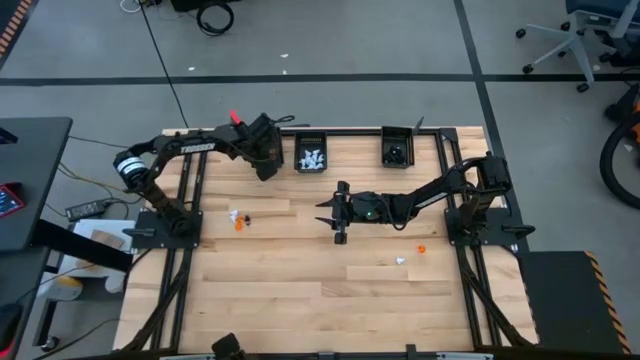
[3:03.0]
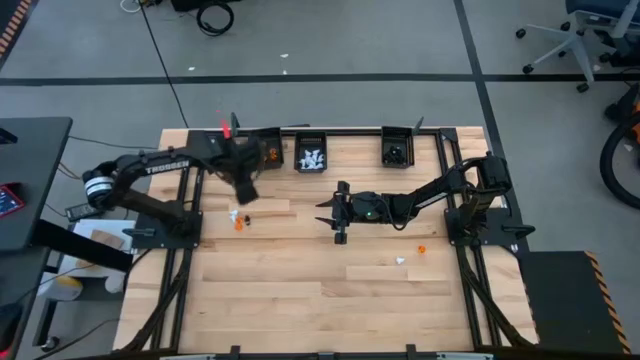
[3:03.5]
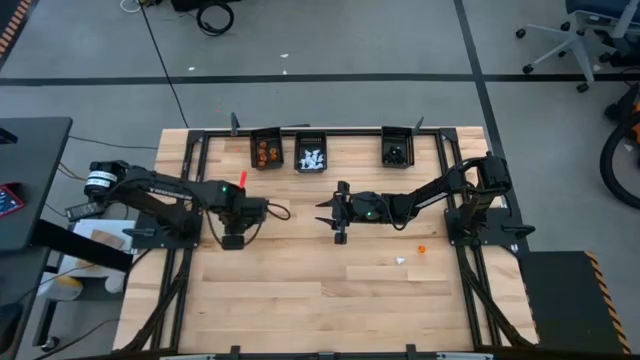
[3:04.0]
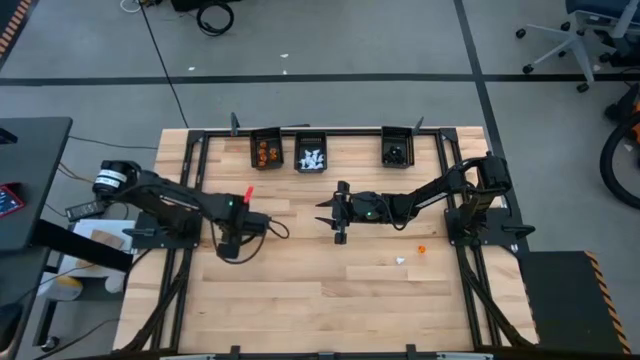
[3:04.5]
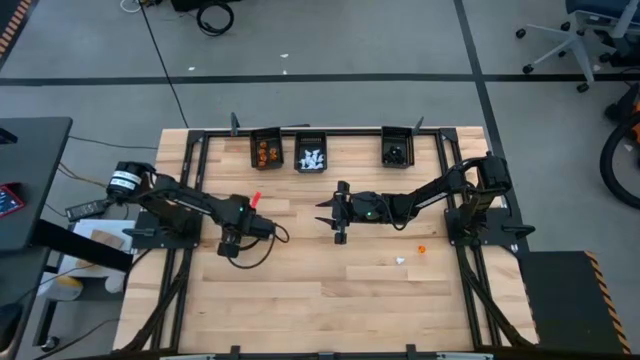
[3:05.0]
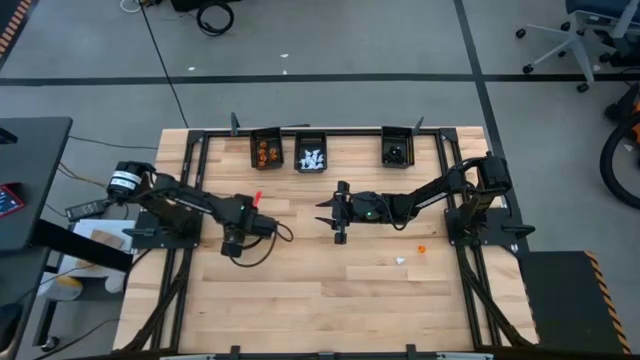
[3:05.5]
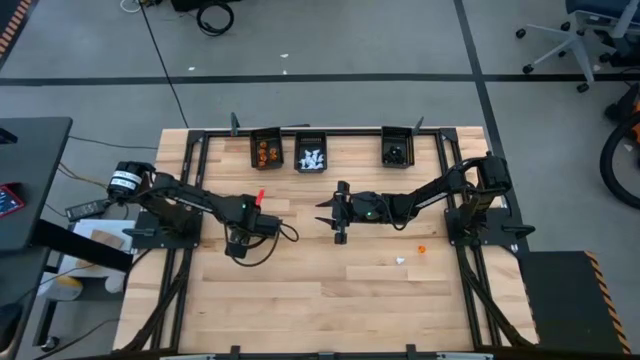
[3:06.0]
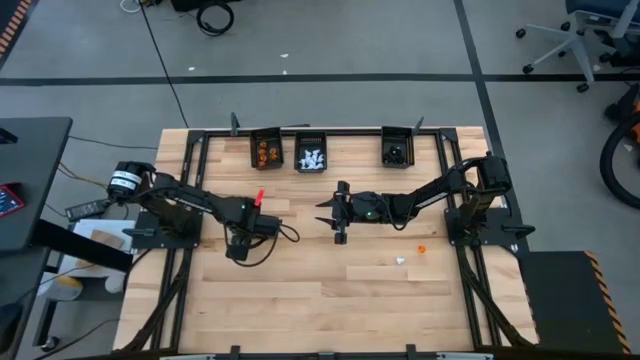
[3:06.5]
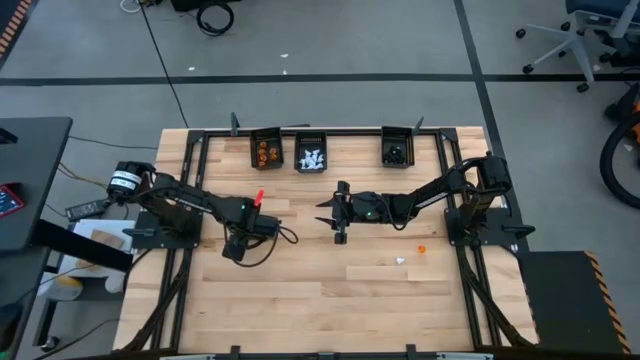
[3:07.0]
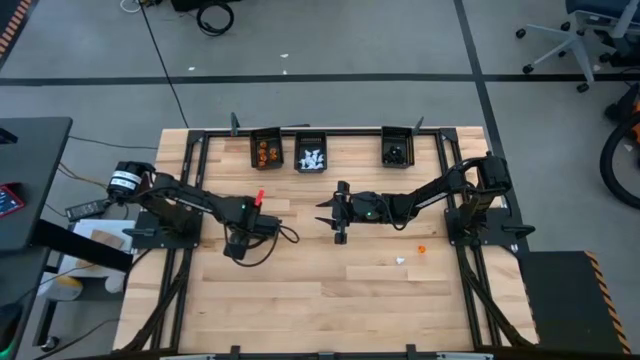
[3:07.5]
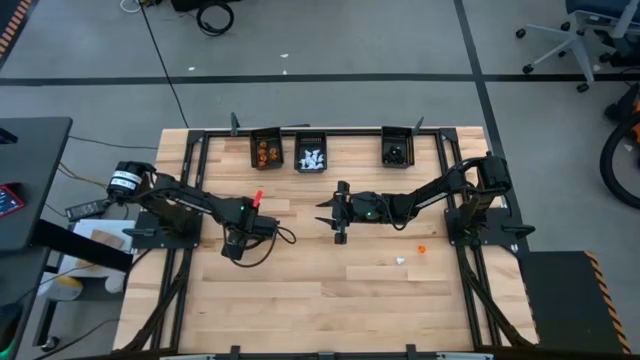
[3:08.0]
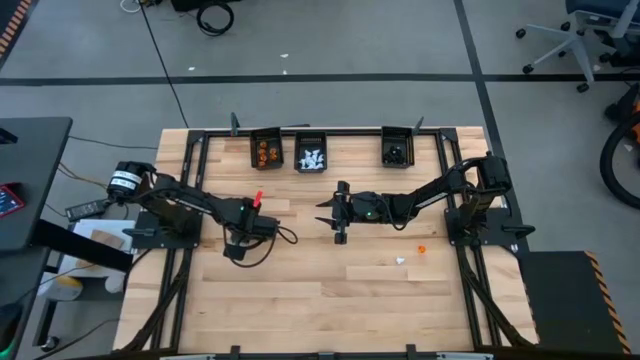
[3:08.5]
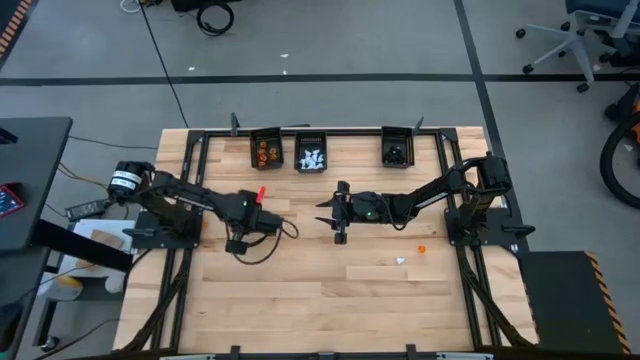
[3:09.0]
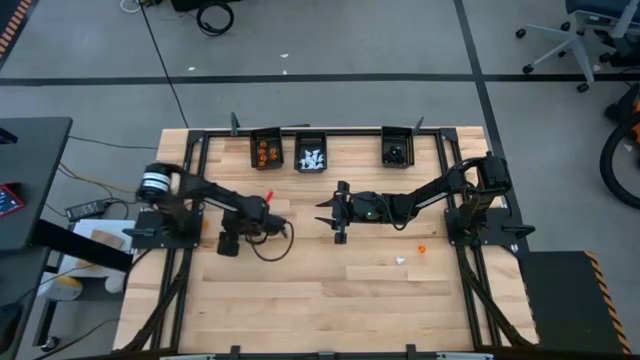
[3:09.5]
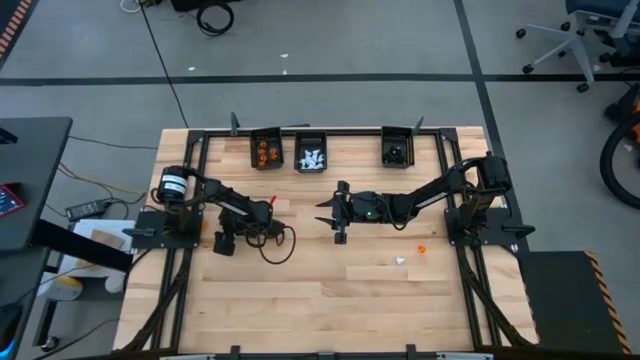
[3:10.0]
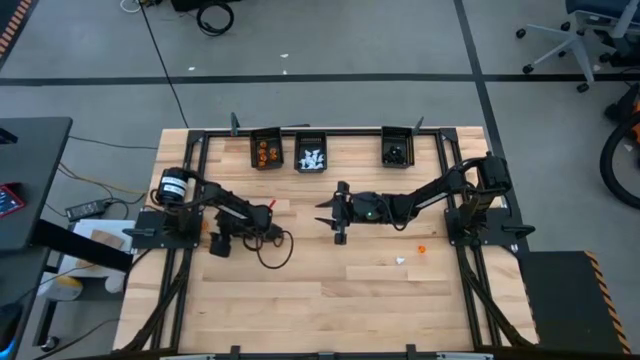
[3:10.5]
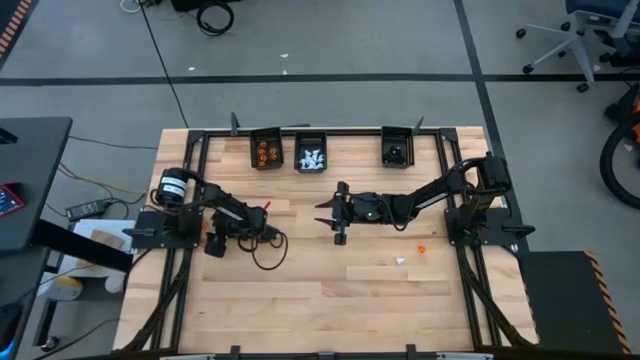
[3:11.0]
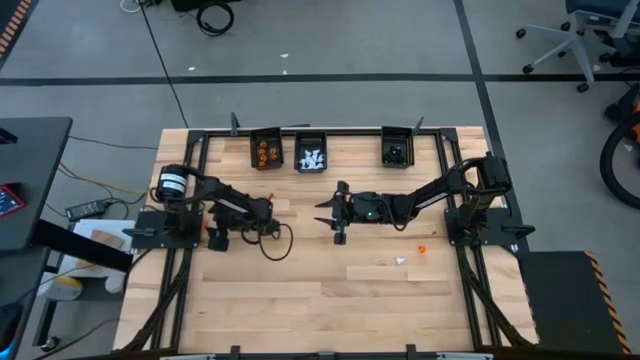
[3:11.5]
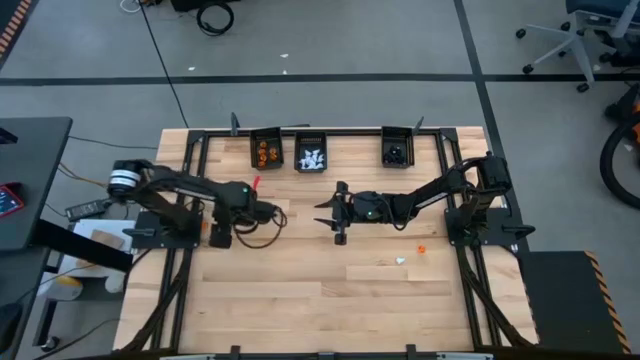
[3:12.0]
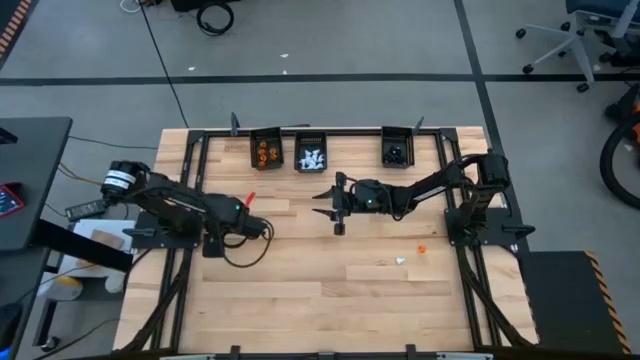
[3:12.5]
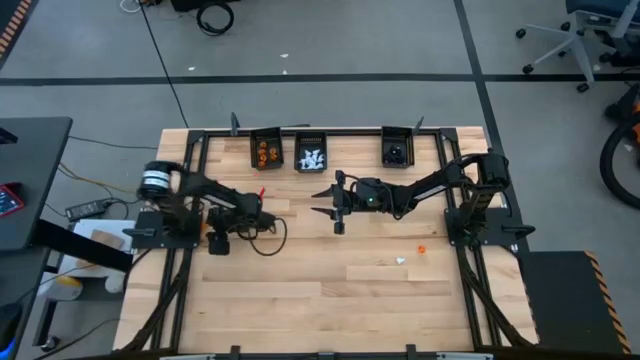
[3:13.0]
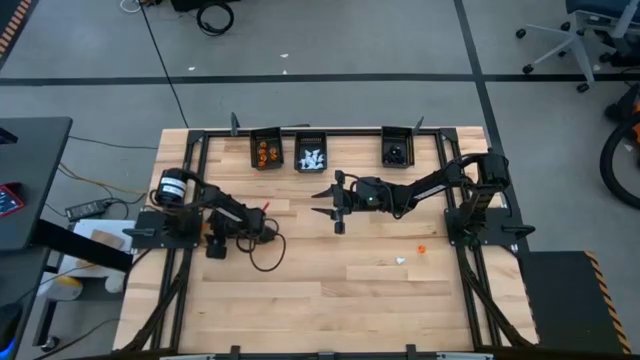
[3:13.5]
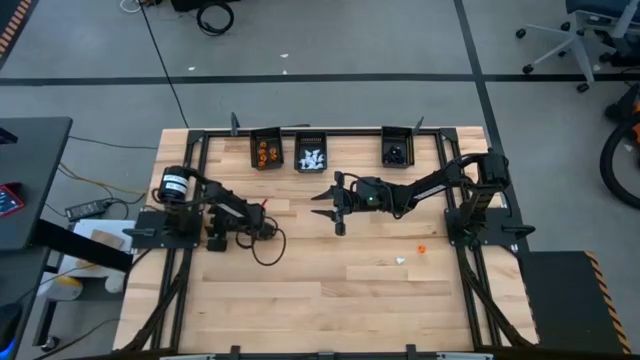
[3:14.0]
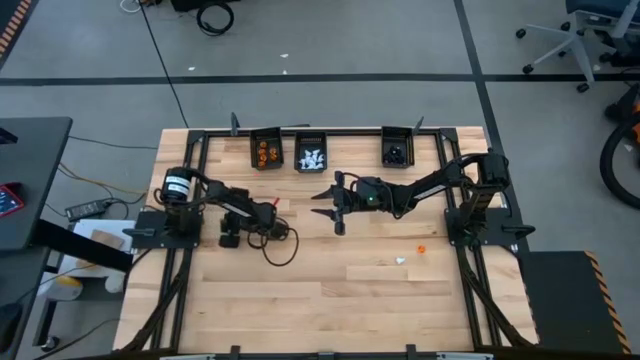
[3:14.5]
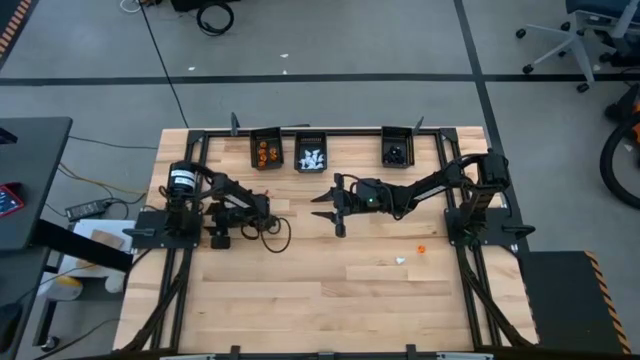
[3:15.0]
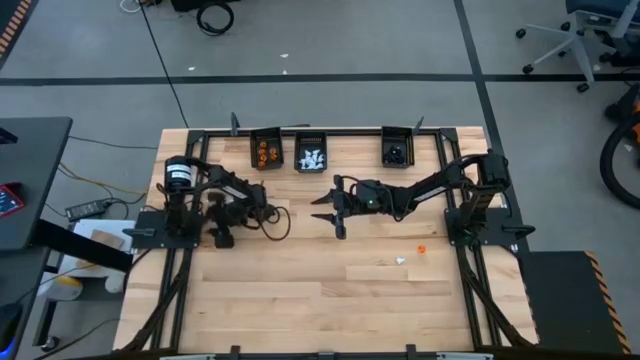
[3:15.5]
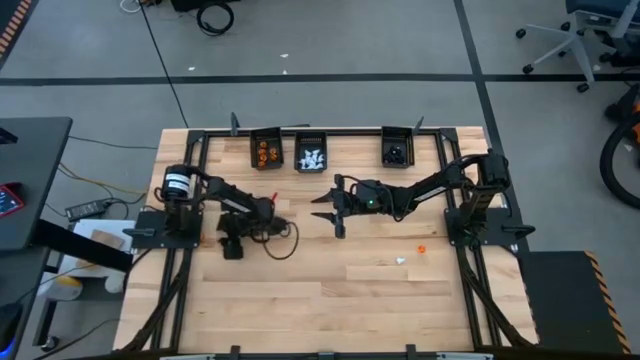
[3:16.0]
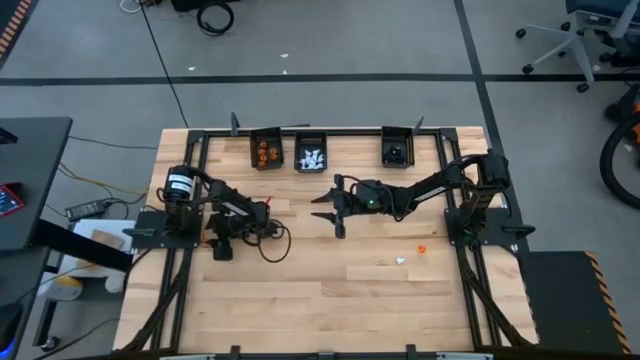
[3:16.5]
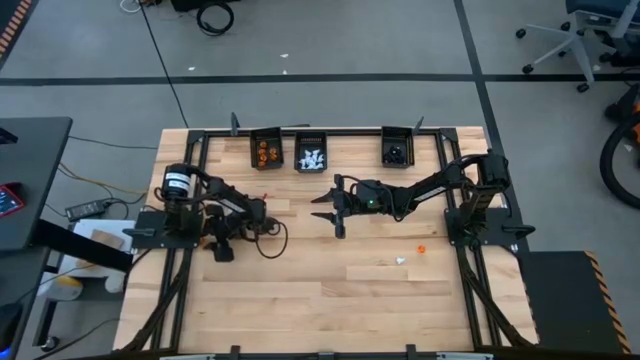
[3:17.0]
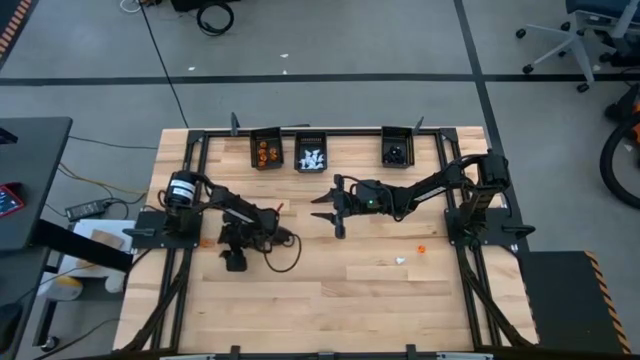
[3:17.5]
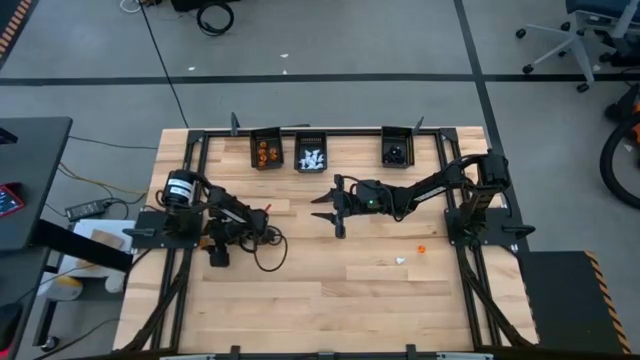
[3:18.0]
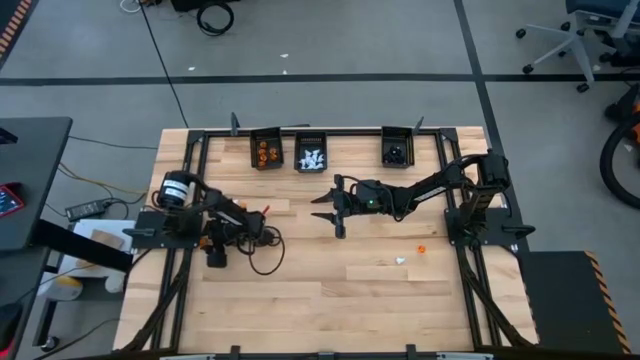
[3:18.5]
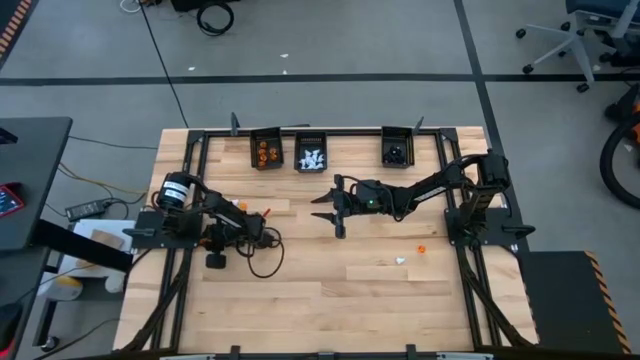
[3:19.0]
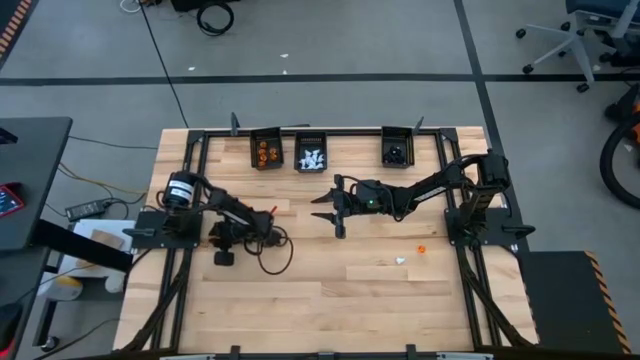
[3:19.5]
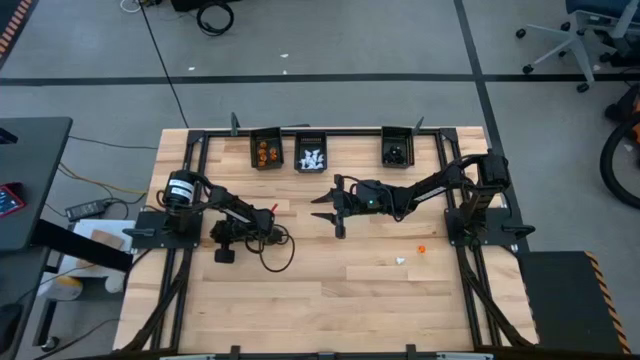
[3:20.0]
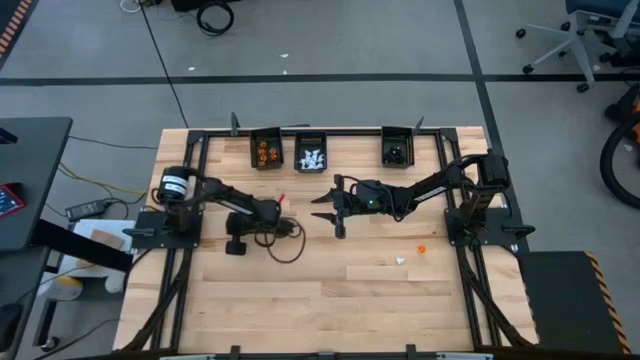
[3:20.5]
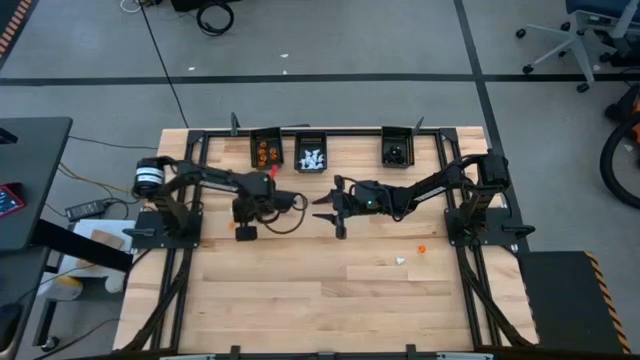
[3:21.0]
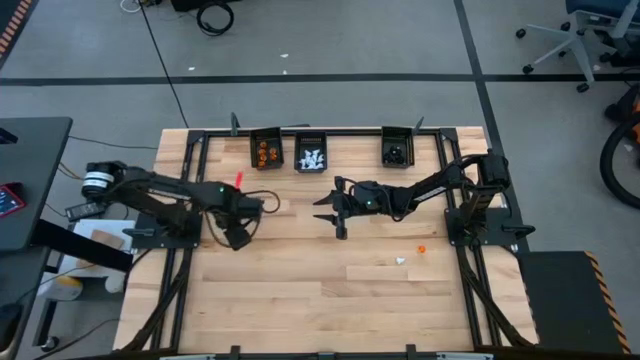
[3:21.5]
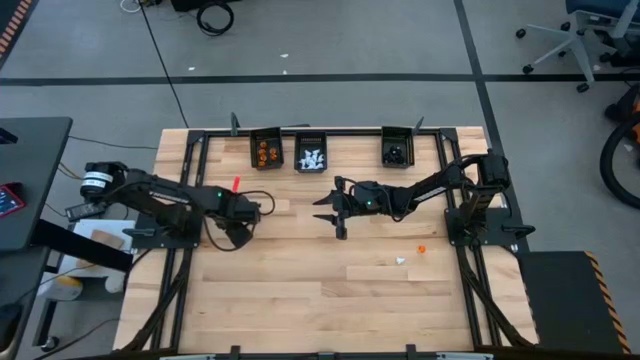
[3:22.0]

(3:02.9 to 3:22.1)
Task: Sort Halloween decoration
Put the orange pumpkin toy into the left black bin

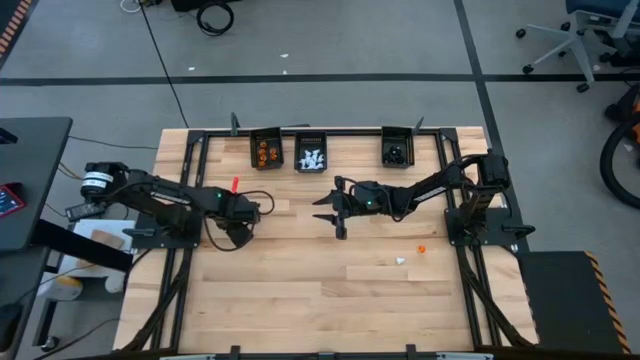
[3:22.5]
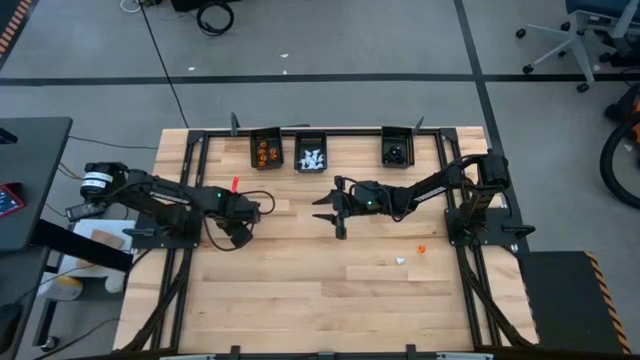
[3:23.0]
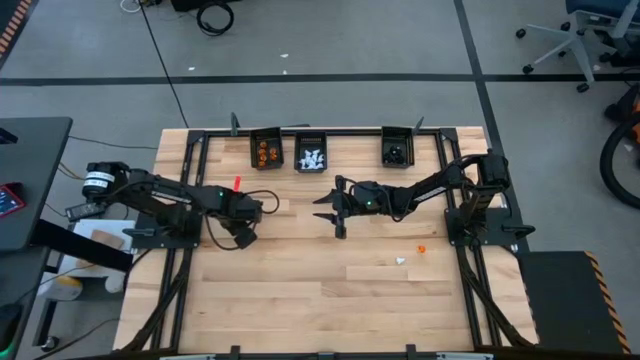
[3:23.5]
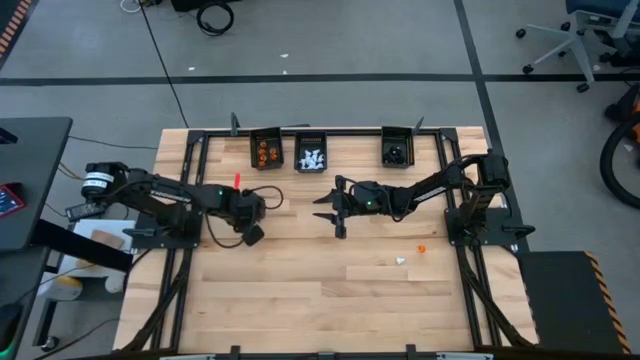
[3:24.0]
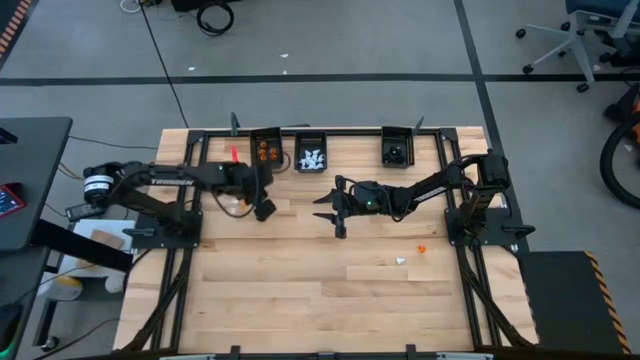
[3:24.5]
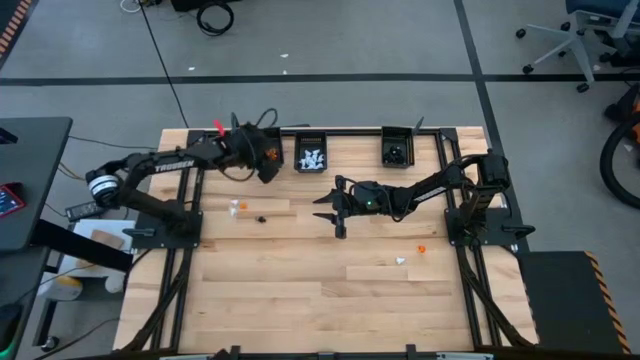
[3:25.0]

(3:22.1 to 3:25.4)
Put the orange pumpkin toy into the left black bin
